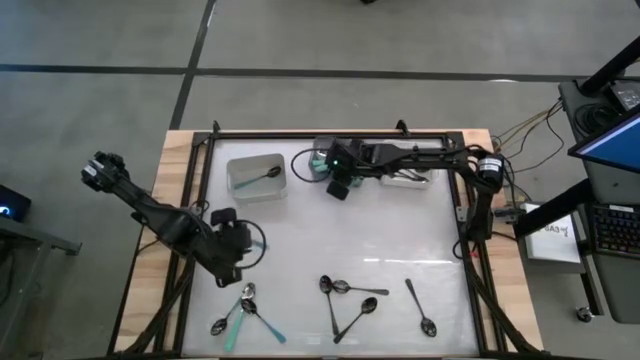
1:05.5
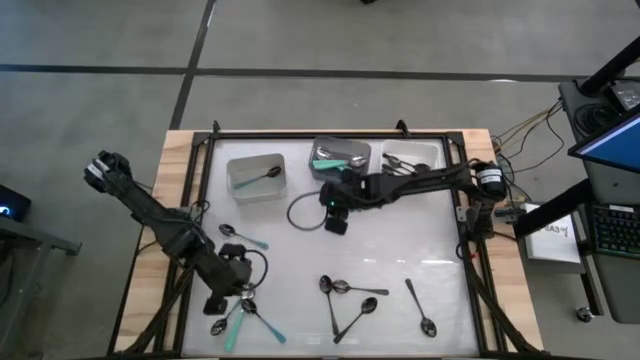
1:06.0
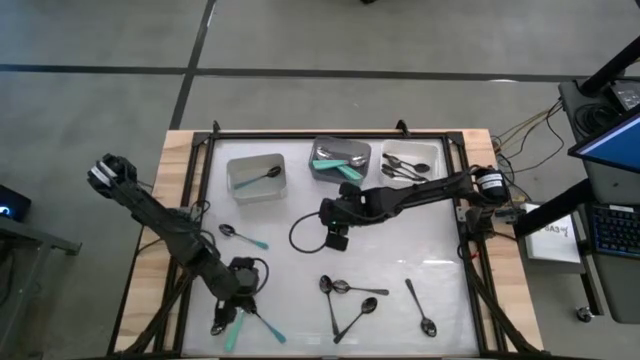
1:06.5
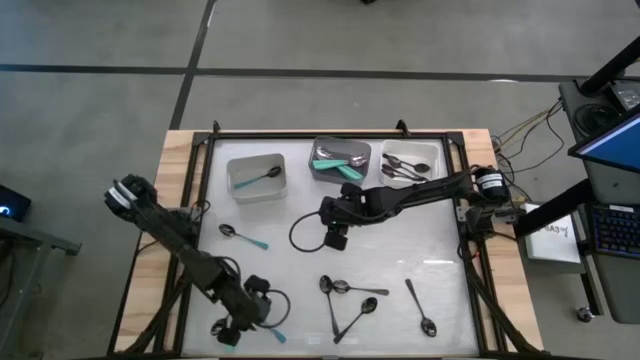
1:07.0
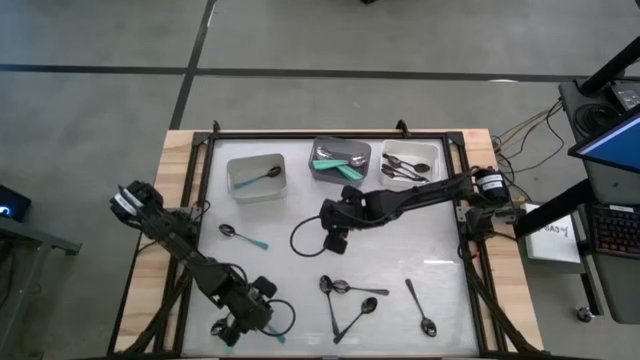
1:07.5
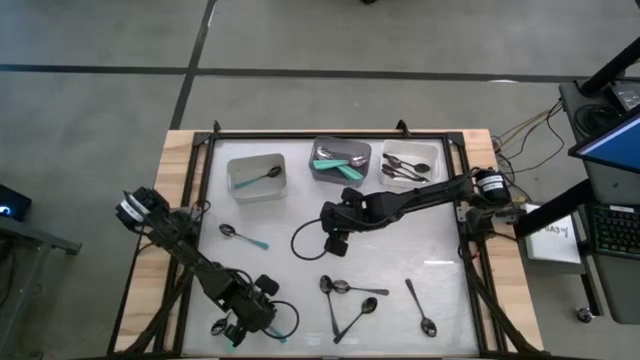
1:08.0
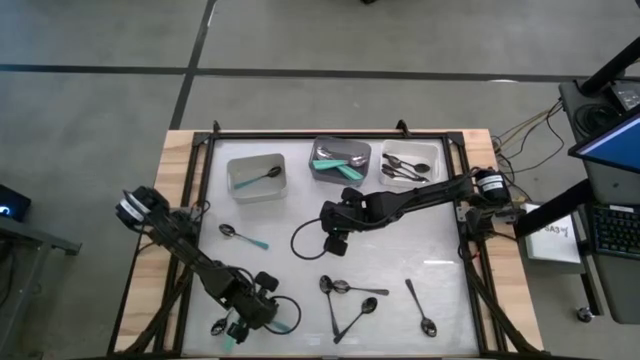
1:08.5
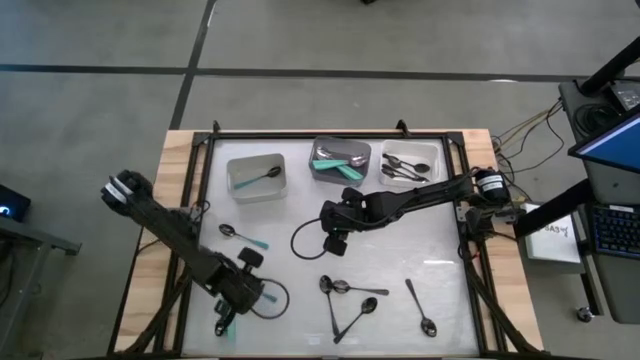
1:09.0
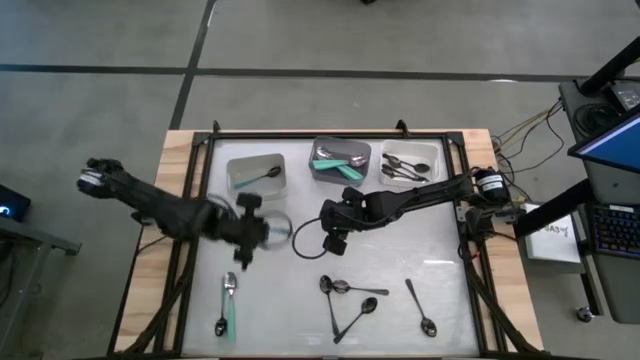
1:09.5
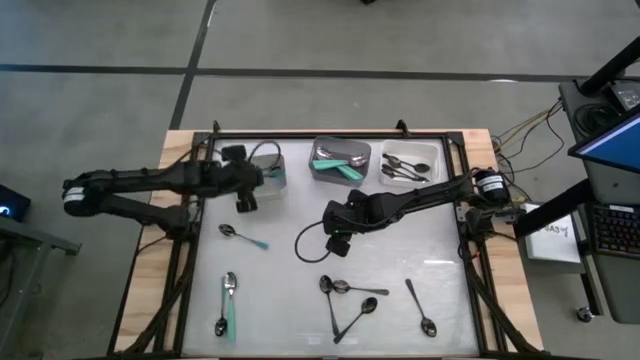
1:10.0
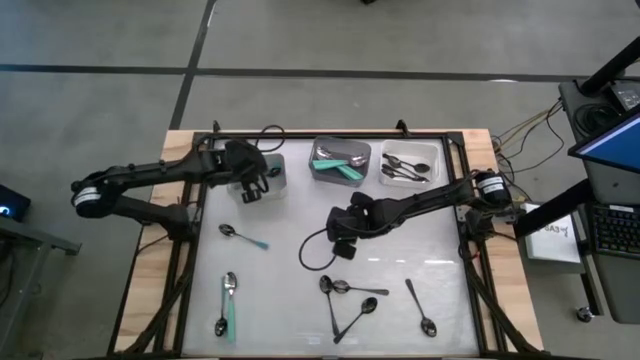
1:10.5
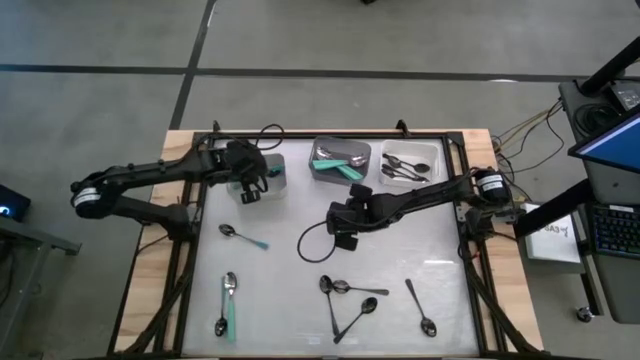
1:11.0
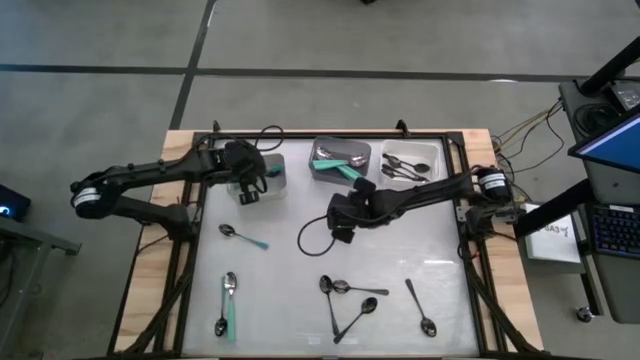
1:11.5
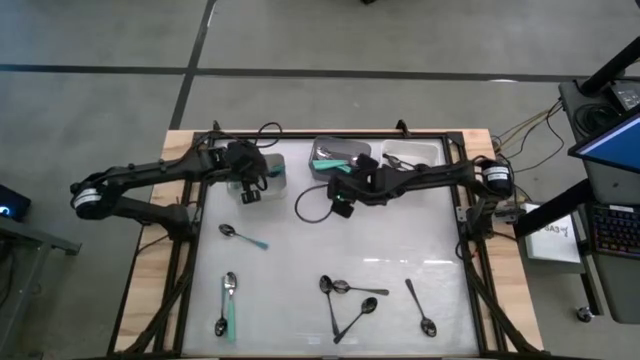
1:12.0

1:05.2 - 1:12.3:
Task: Sort silverware by color (type)
Put the blue spoon into the gray bin

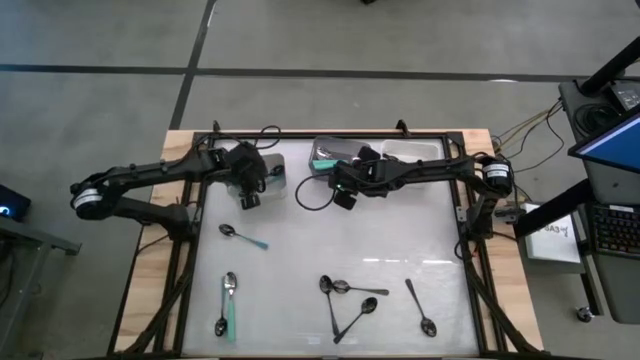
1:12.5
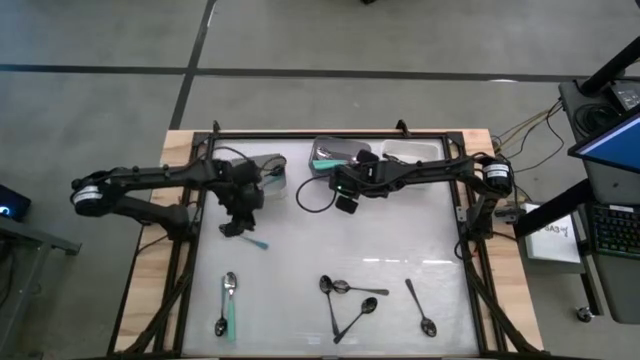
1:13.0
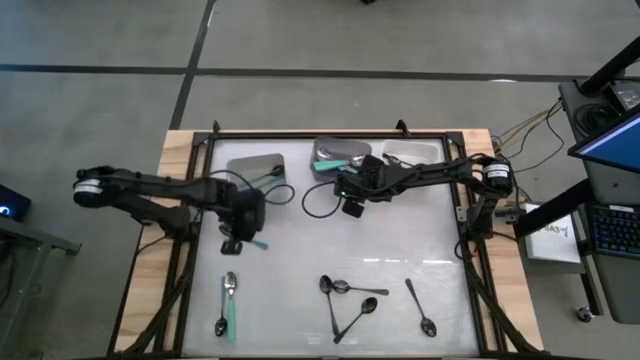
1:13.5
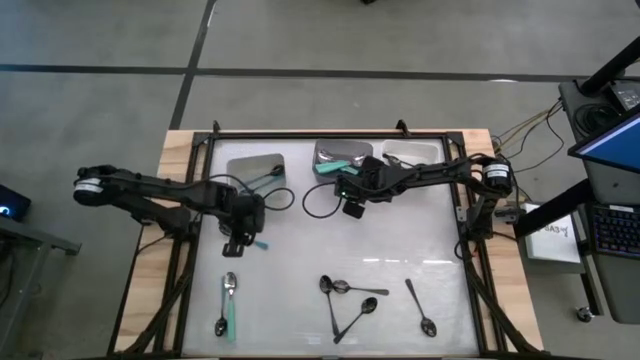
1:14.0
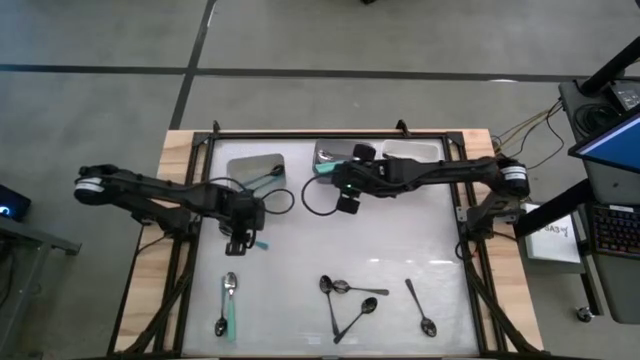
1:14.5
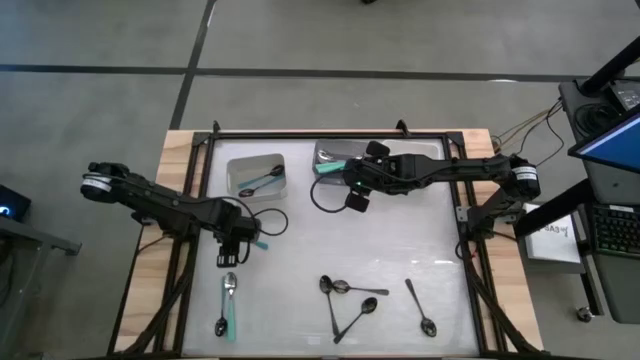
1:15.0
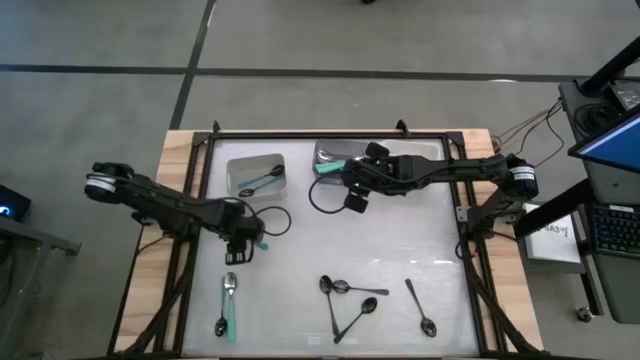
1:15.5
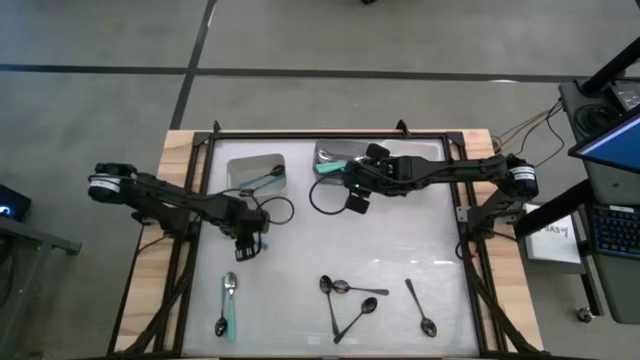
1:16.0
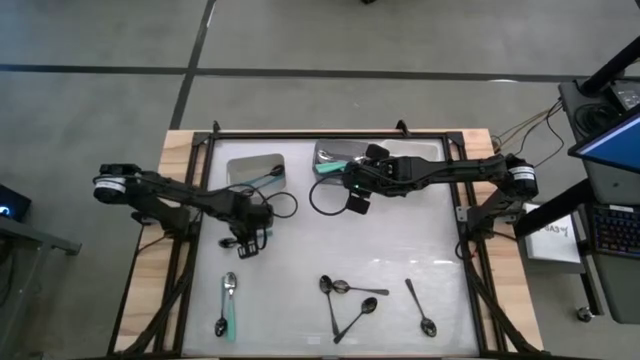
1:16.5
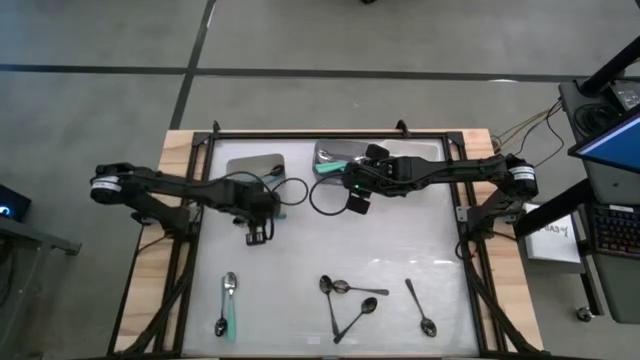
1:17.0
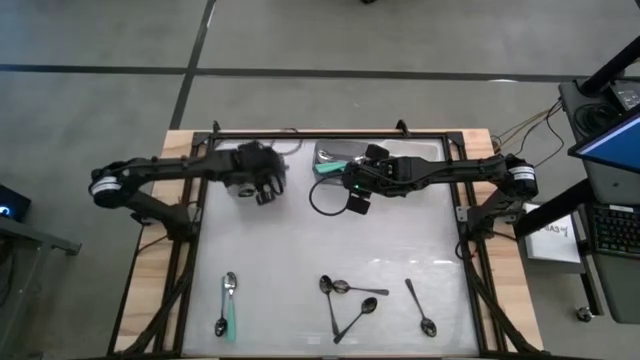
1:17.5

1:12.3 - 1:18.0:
Put the blue spoon into the gray bin

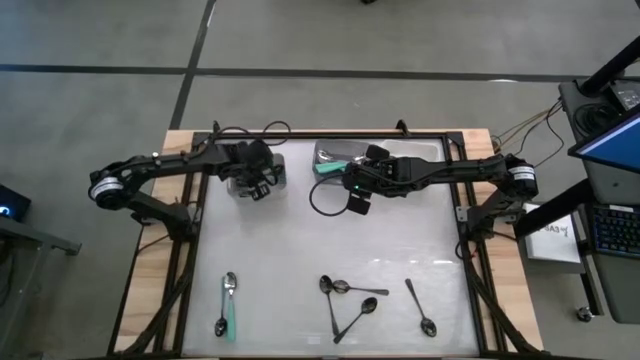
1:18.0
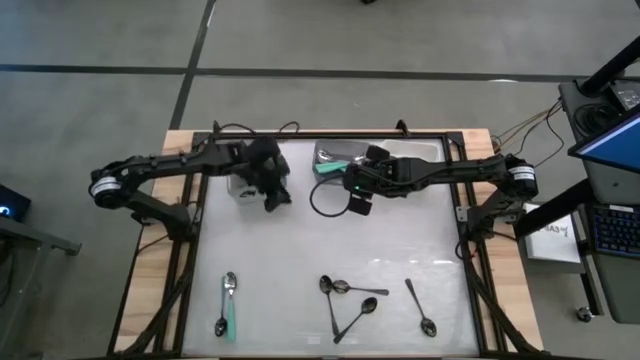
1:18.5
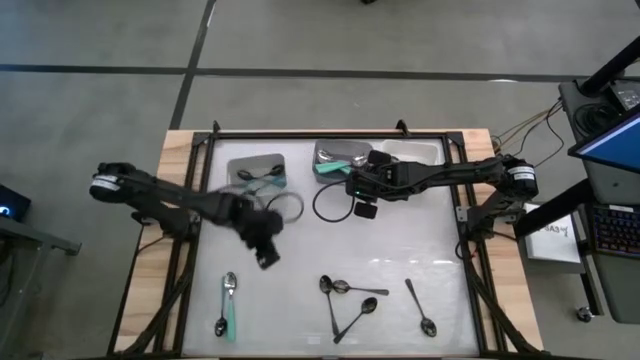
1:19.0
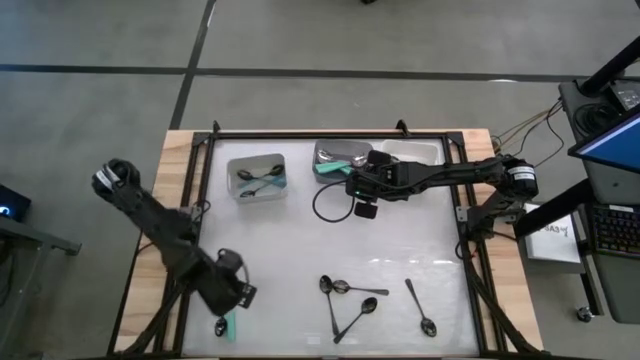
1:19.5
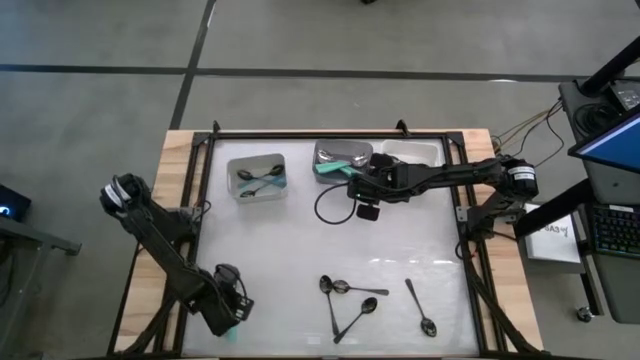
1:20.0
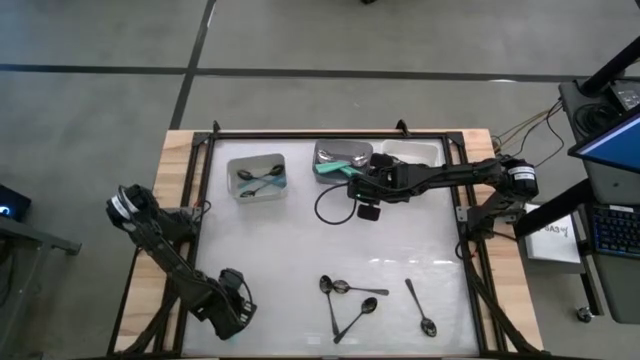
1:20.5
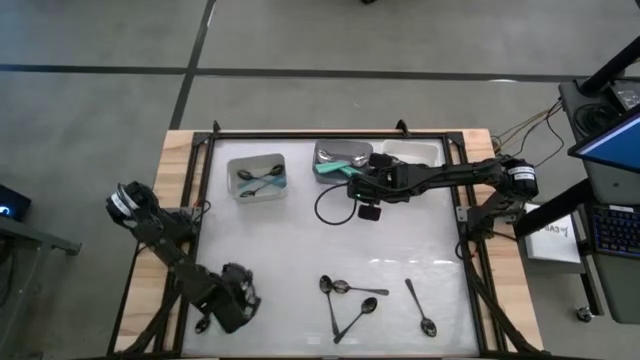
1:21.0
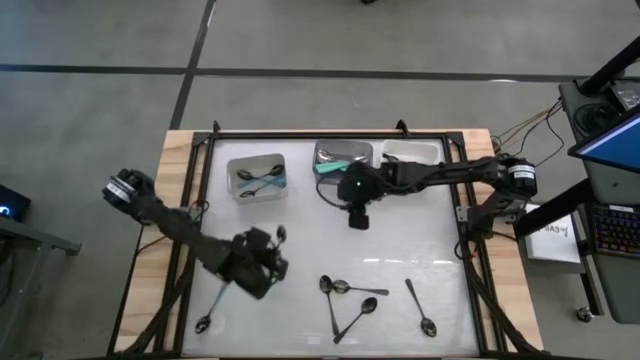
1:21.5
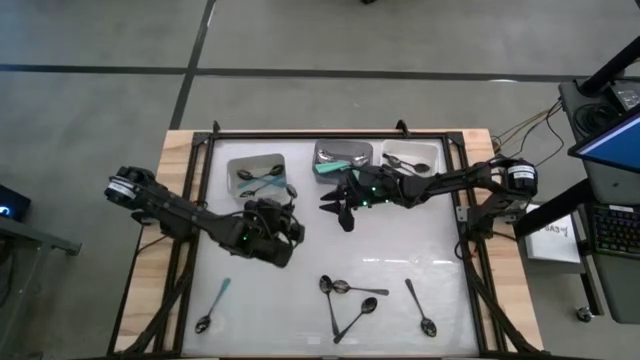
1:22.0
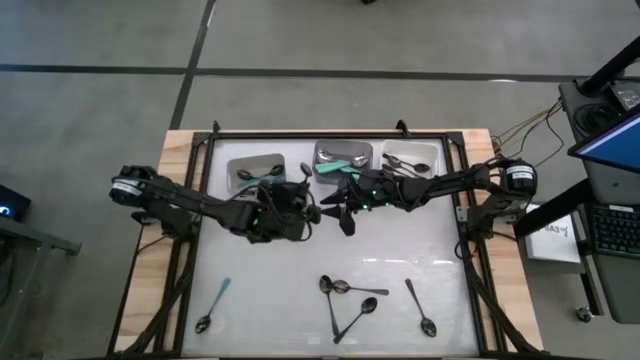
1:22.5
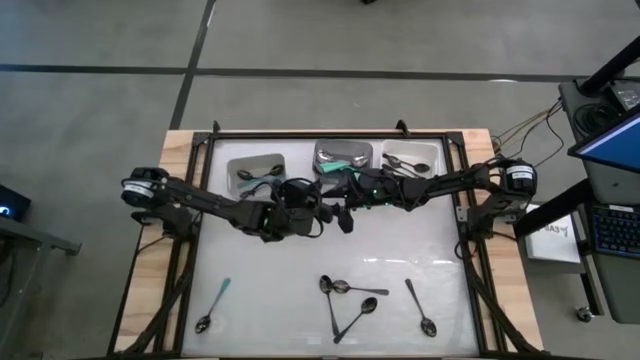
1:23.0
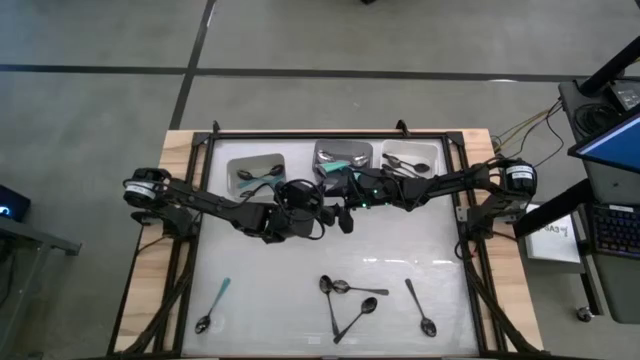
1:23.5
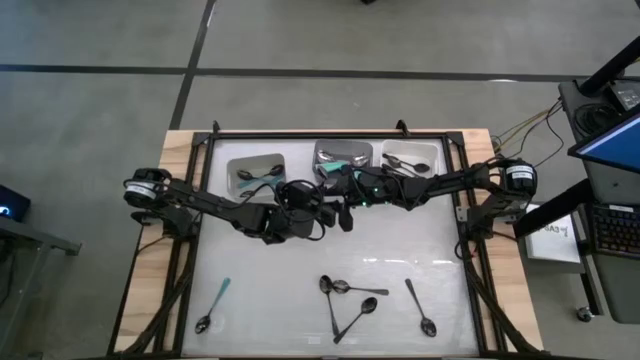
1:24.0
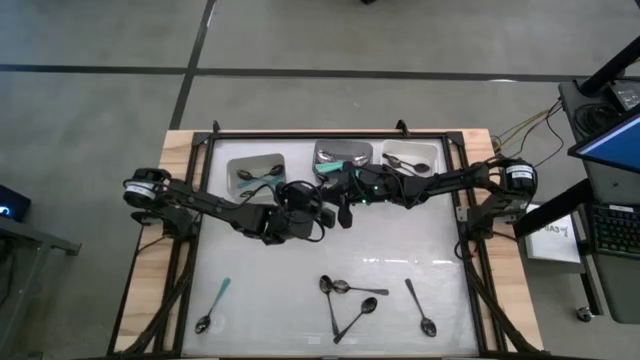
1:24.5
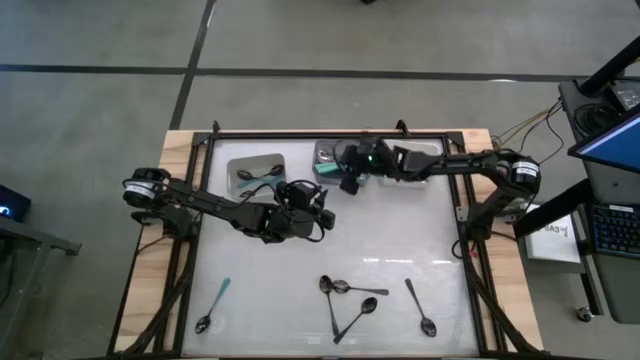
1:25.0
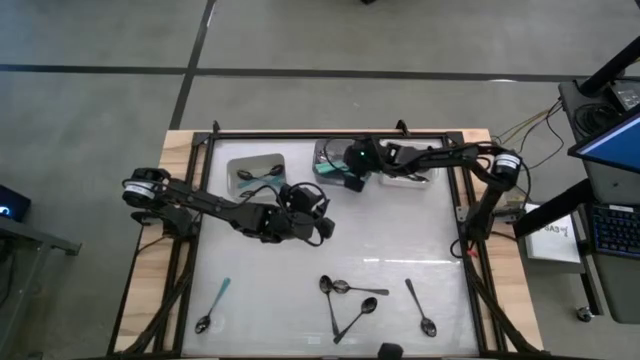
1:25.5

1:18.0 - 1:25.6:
Put the green spoon into the black bin

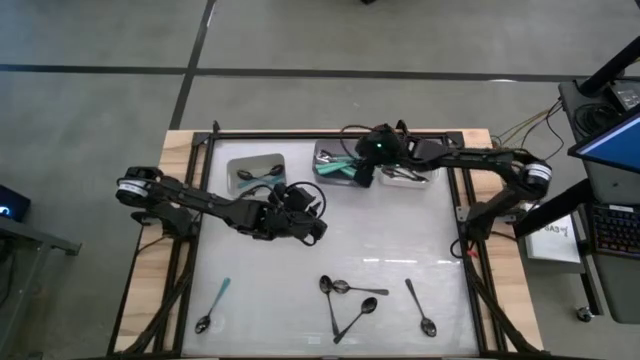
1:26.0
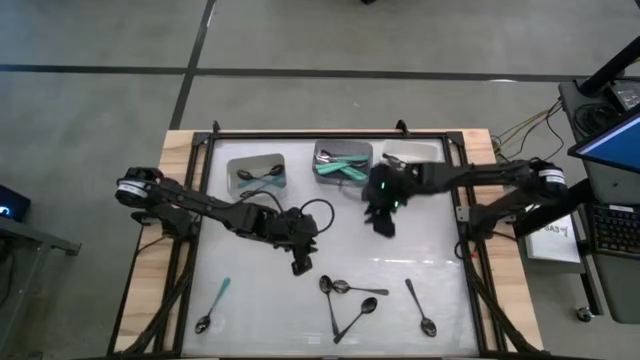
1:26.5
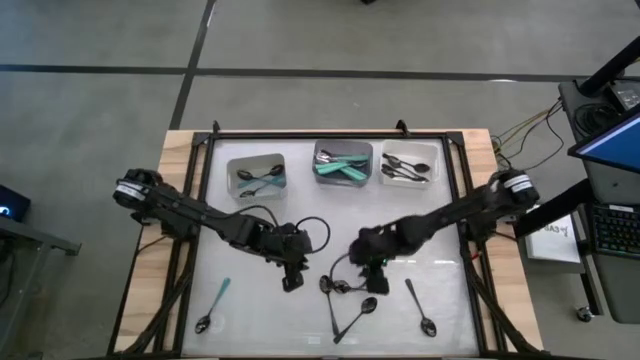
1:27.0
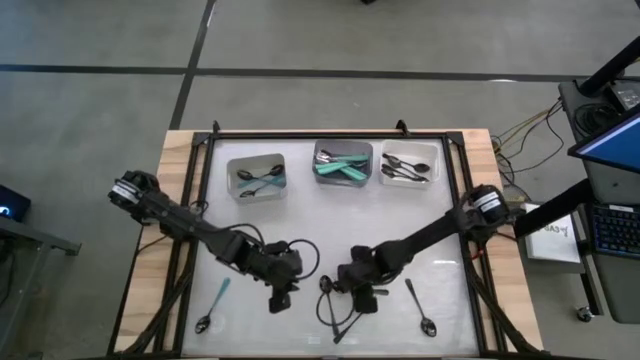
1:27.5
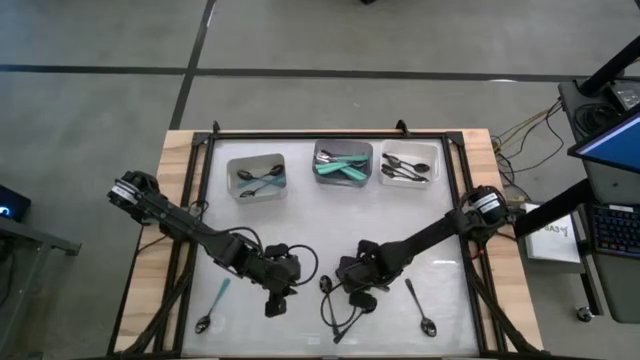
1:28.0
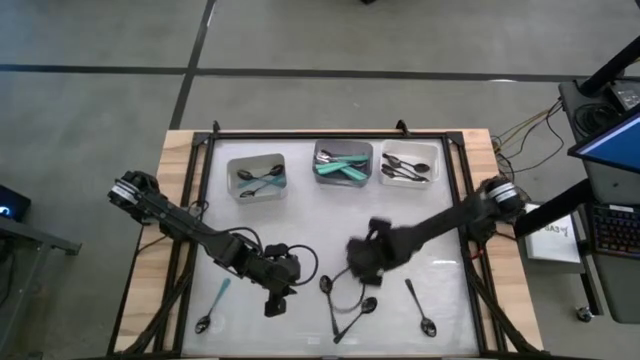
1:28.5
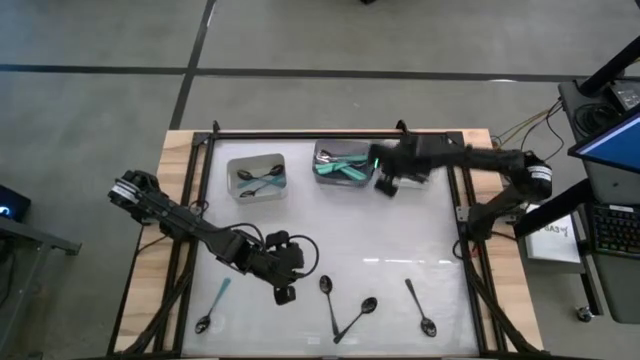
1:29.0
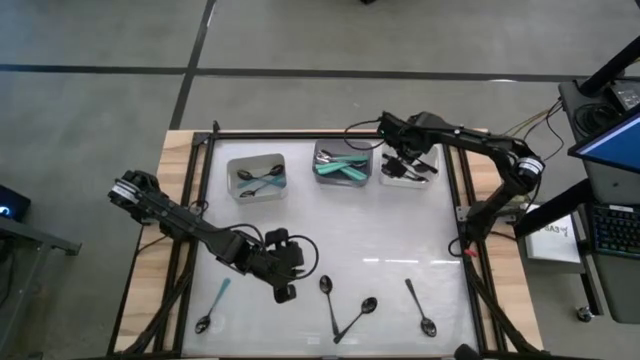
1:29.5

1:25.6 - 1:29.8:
Put the black spoon into the white bin
